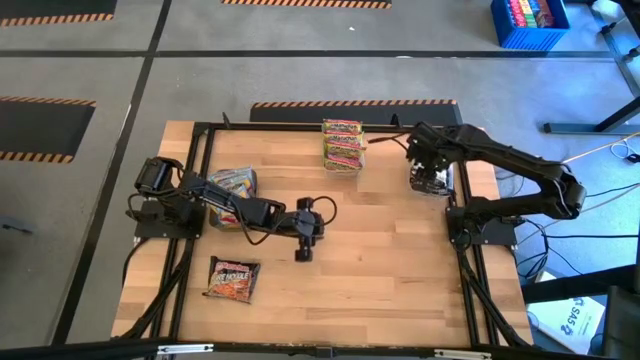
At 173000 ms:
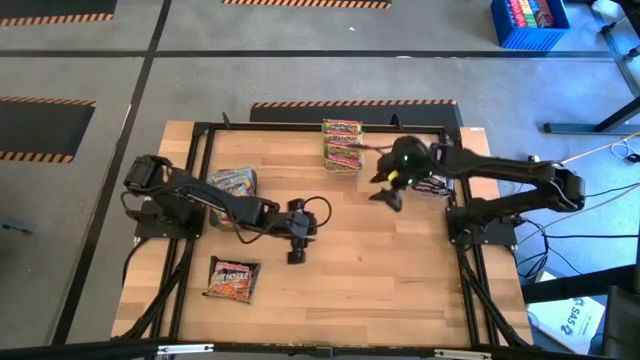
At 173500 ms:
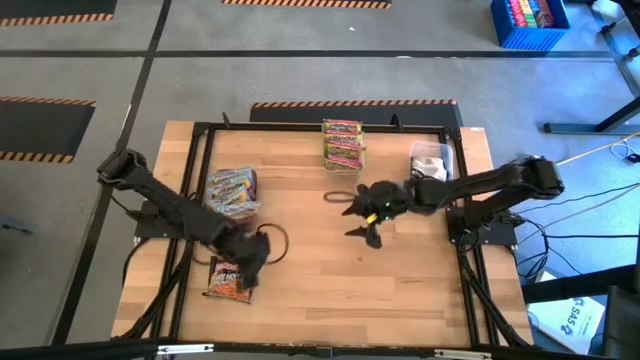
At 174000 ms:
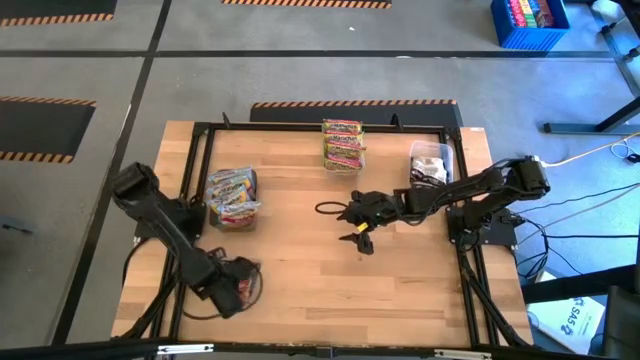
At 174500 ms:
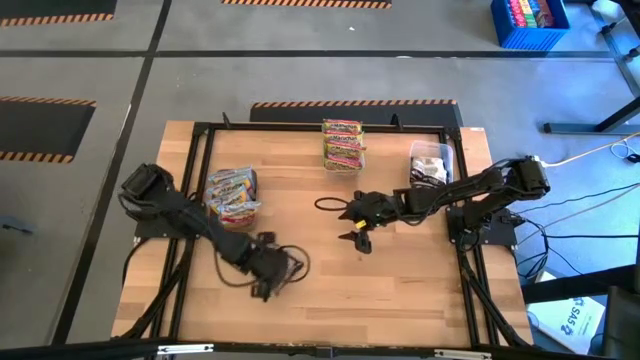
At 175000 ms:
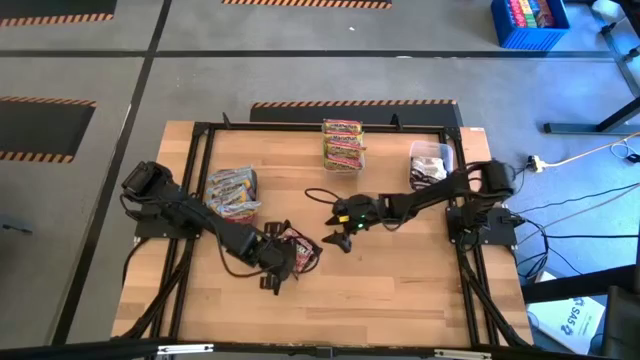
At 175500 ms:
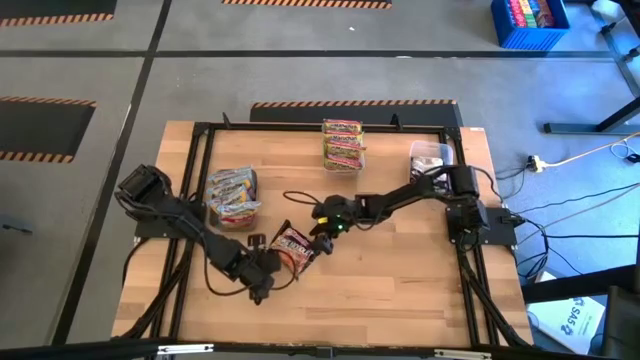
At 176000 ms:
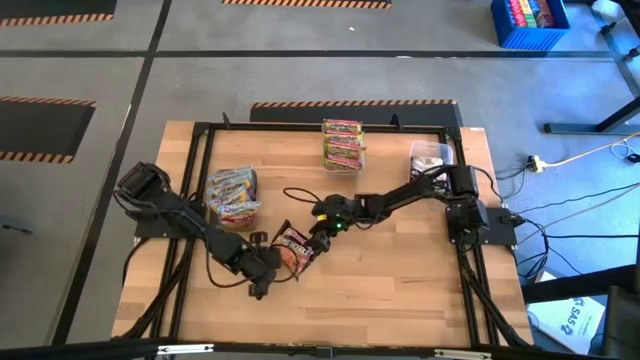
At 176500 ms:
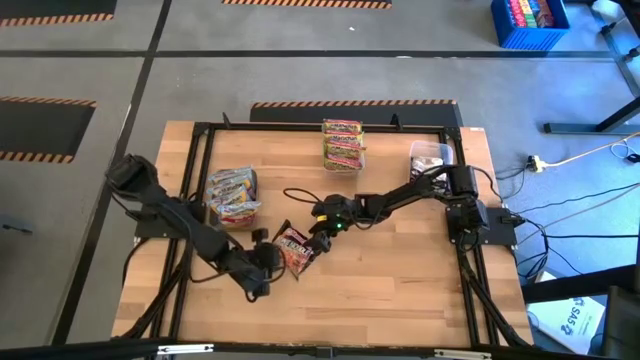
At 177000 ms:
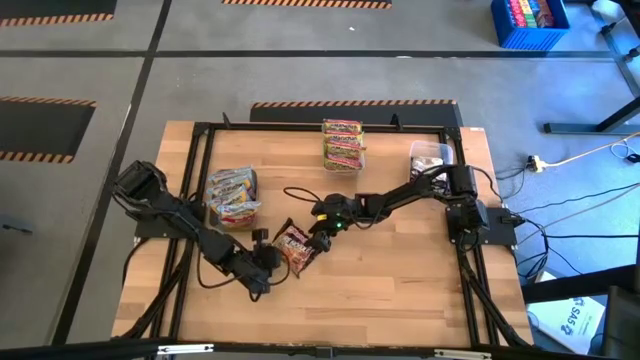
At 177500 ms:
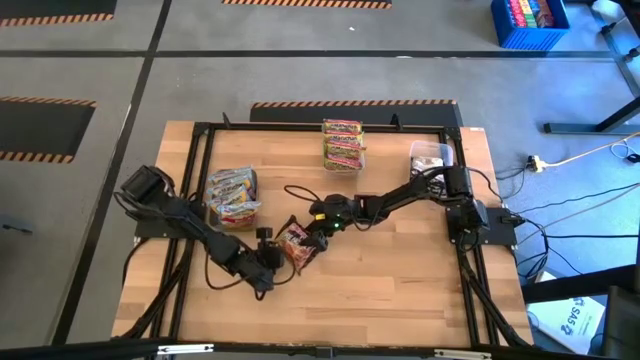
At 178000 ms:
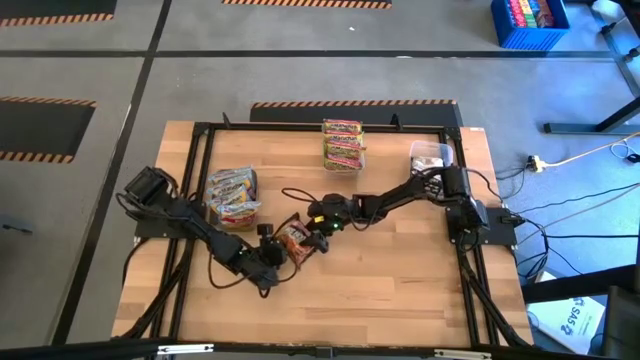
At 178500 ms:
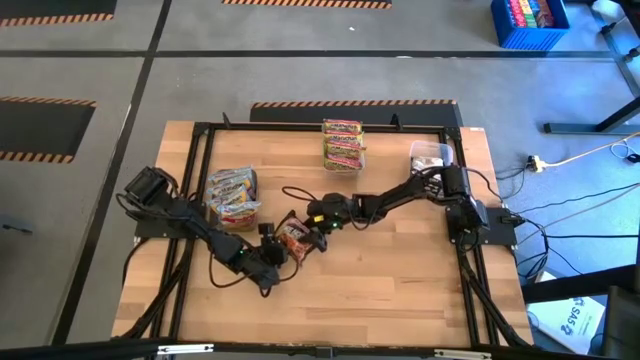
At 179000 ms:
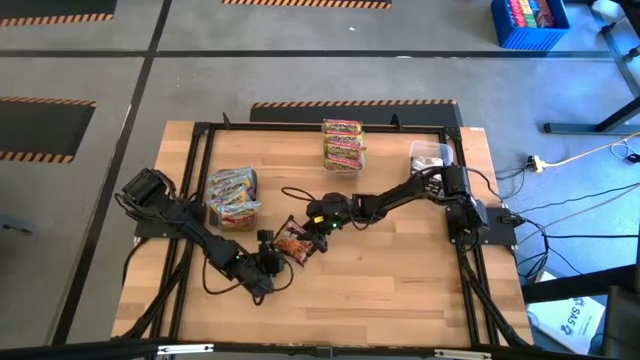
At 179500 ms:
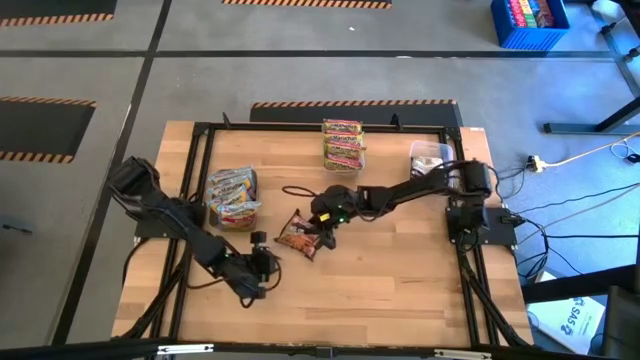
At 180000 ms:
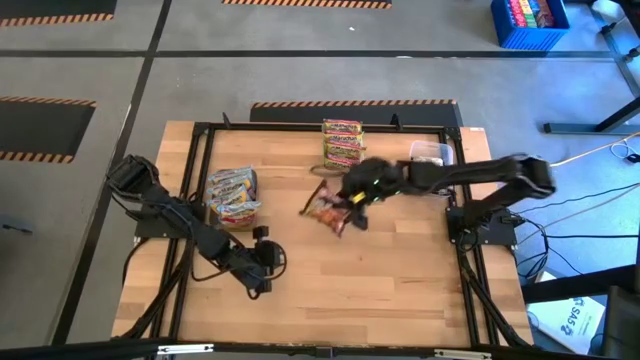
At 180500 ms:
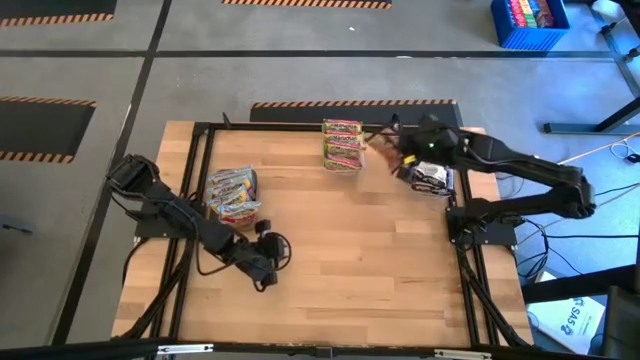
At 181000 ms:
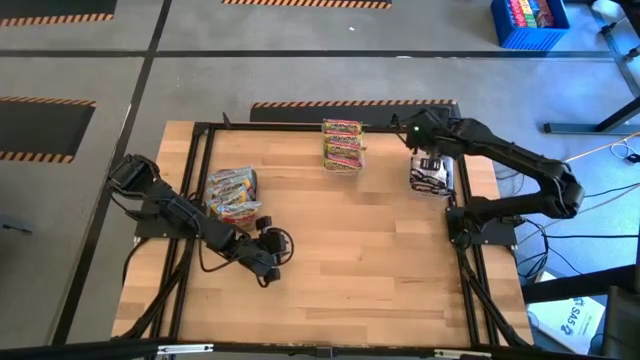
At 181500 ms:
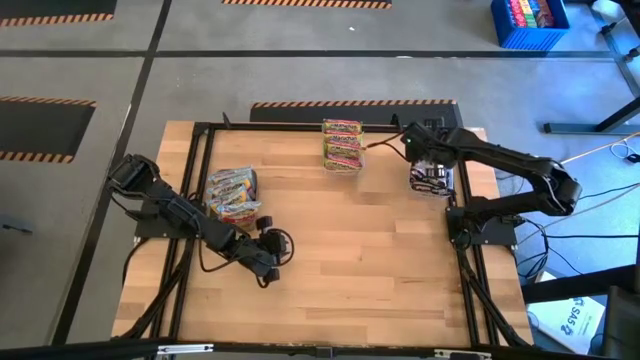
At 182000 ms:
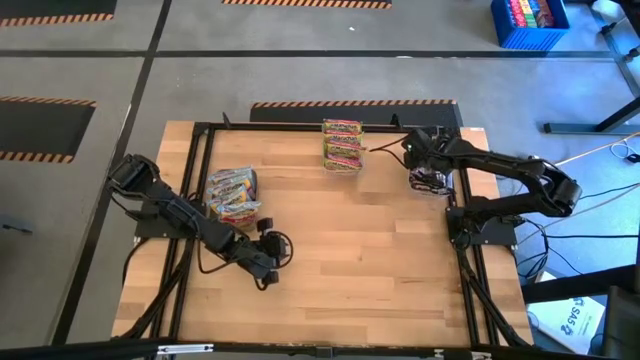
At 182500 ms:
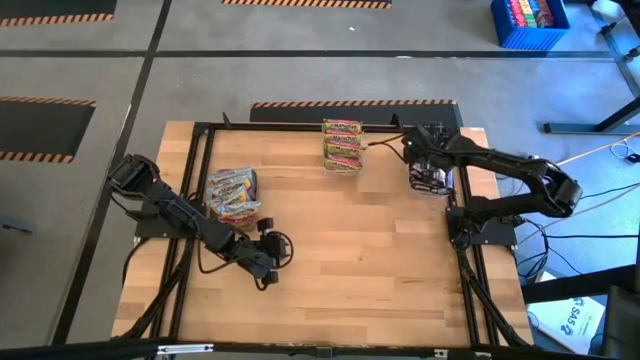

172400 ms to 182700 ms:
Task: Sort Maruchan noodles
Put the black noodle pack into the bottom transparent bin

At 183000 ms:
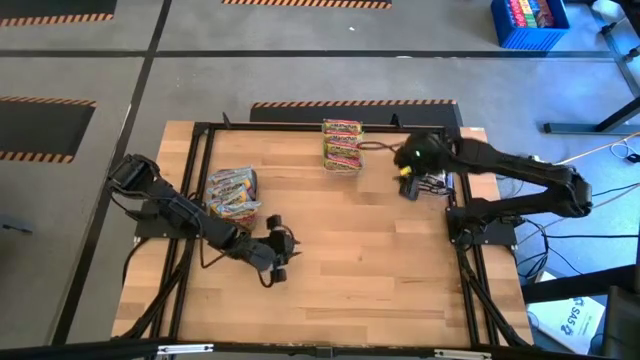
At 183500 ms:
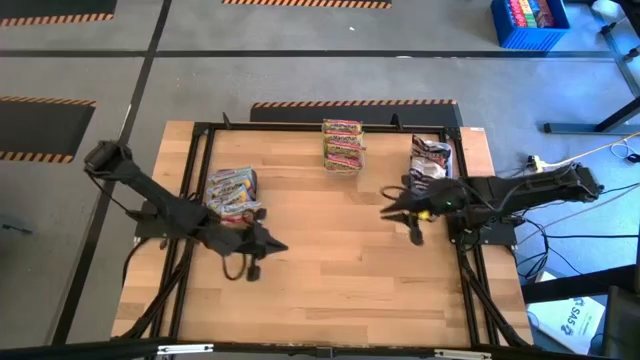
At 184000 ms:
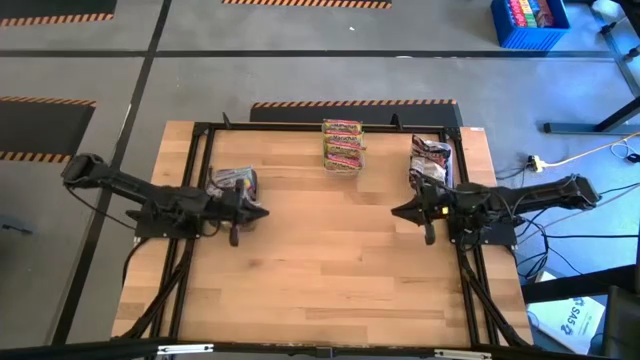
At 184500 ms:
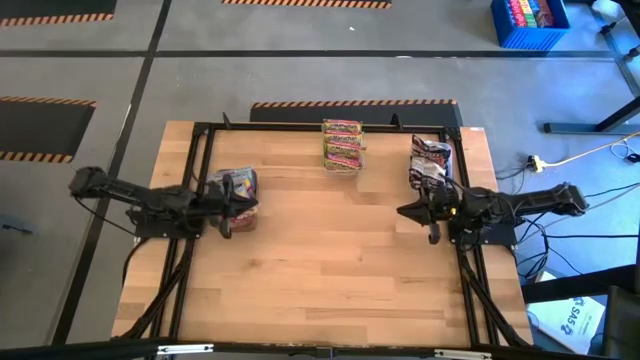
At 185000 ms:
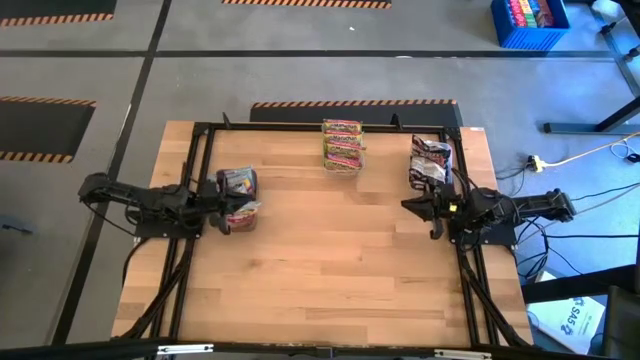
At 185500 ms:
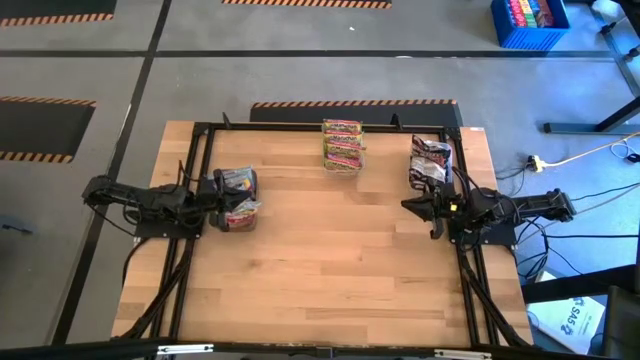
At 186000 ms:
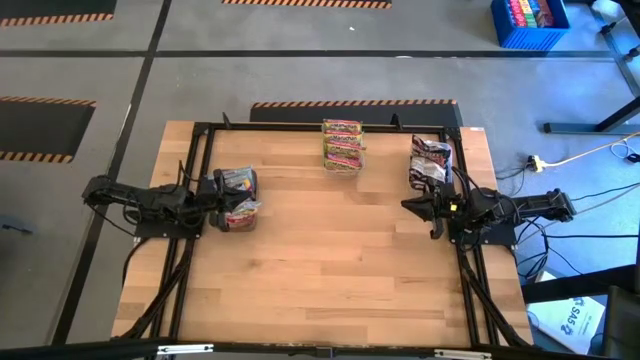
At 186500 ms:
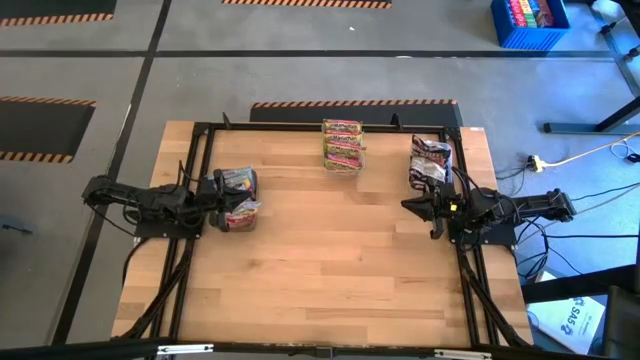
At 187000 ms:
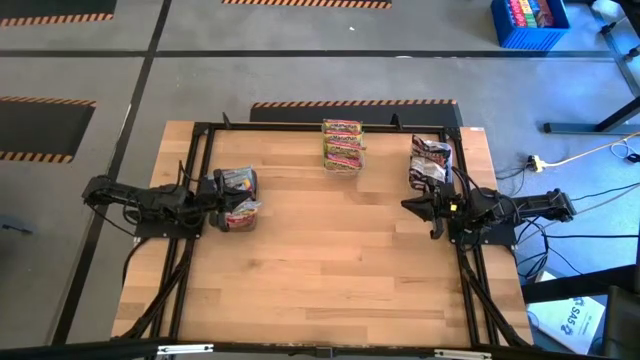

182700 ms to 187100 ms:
Return to Home Position

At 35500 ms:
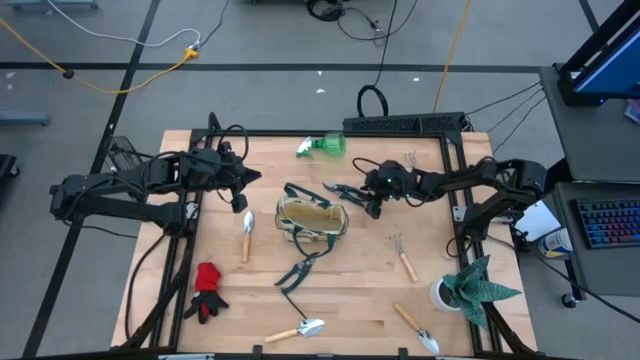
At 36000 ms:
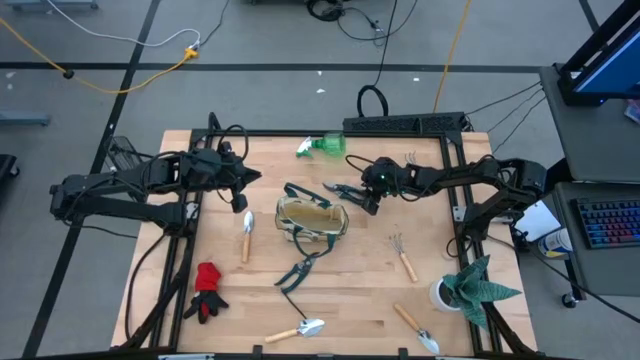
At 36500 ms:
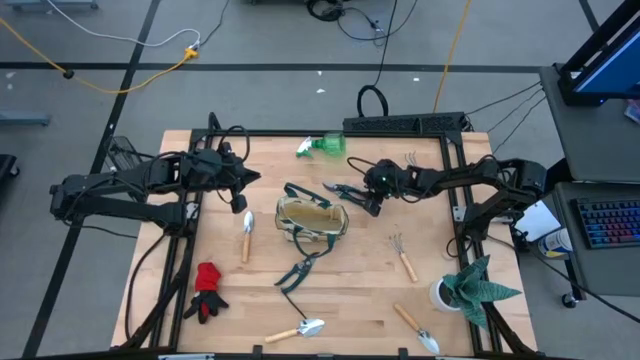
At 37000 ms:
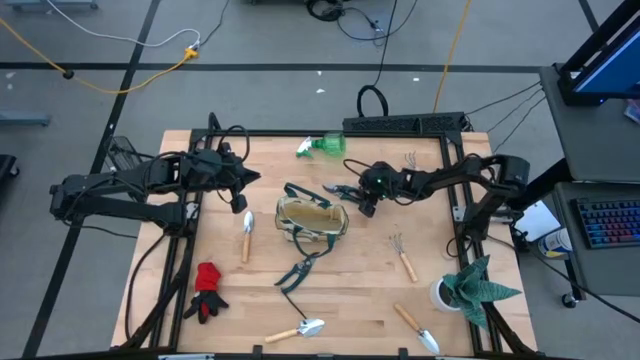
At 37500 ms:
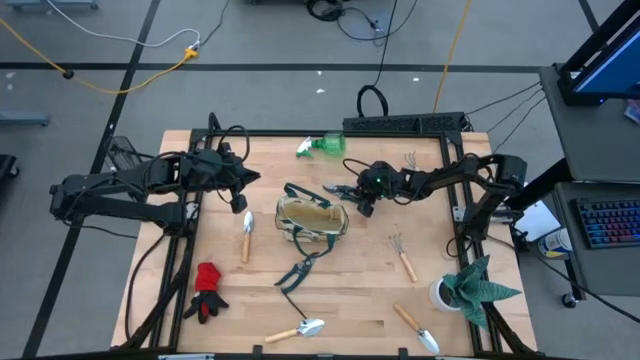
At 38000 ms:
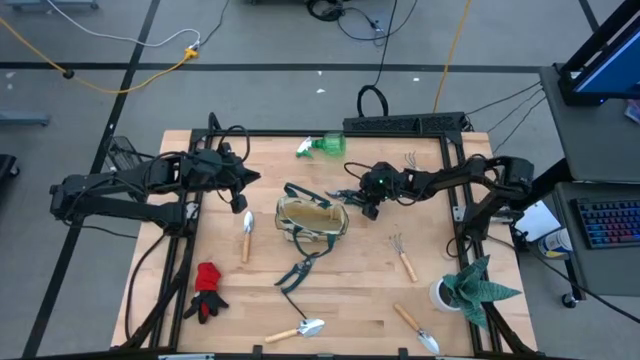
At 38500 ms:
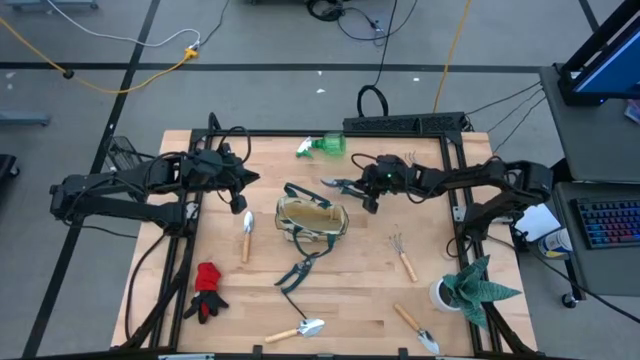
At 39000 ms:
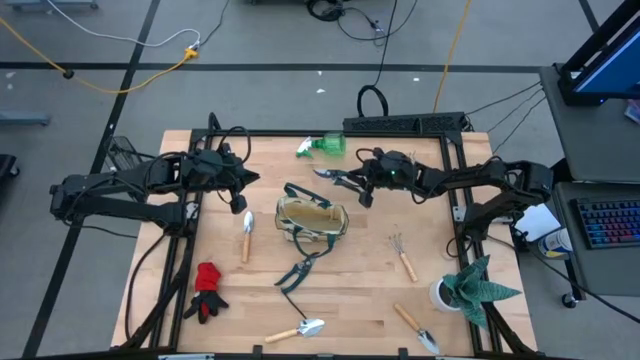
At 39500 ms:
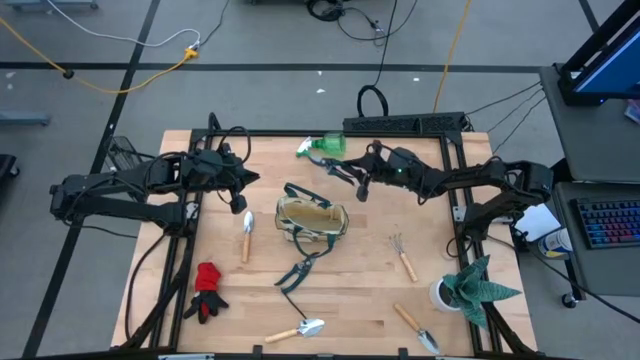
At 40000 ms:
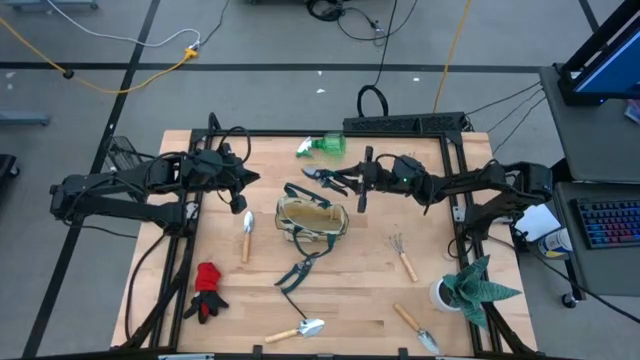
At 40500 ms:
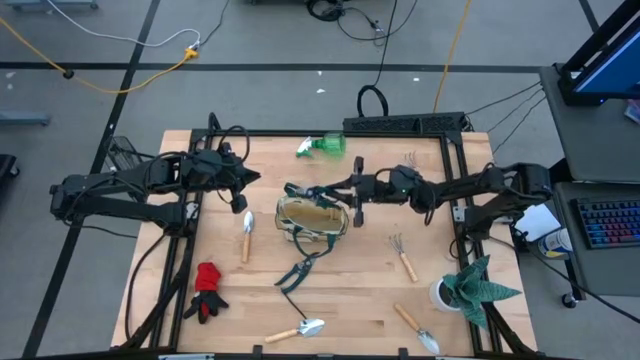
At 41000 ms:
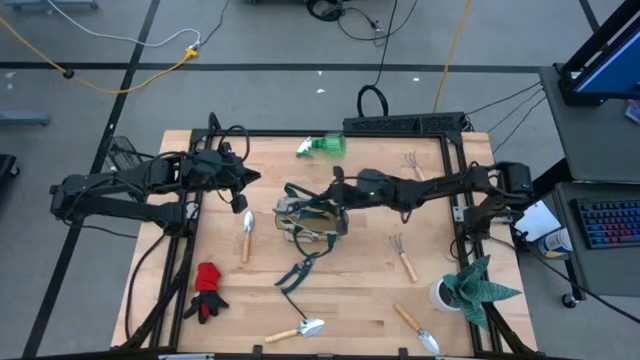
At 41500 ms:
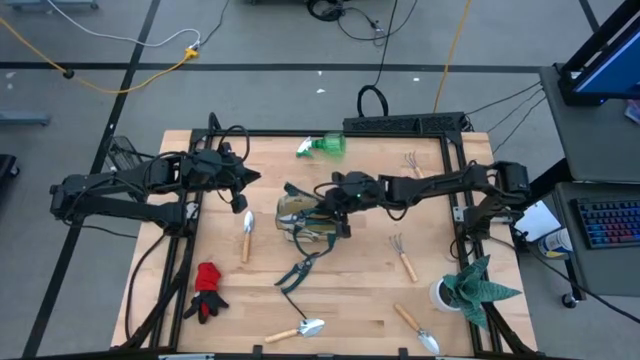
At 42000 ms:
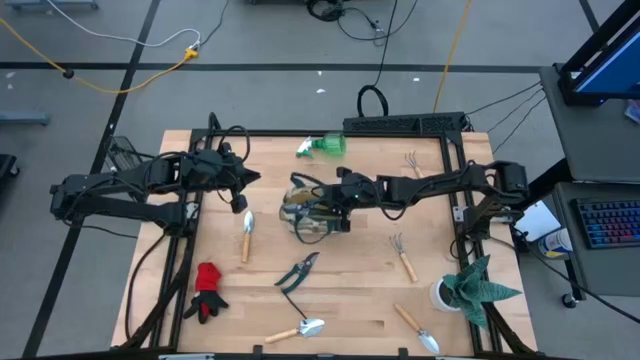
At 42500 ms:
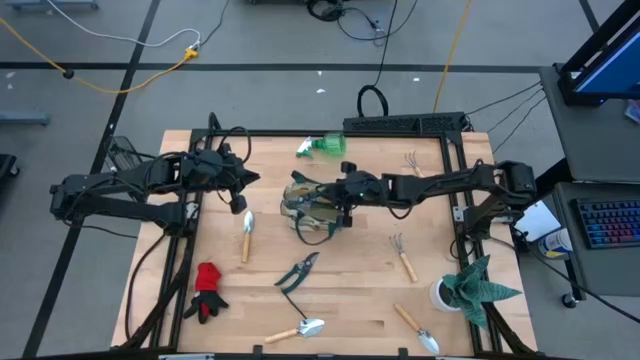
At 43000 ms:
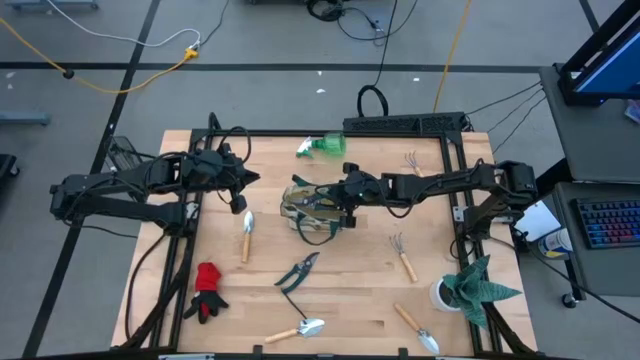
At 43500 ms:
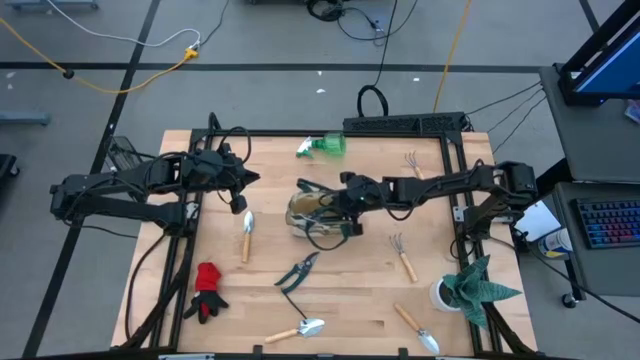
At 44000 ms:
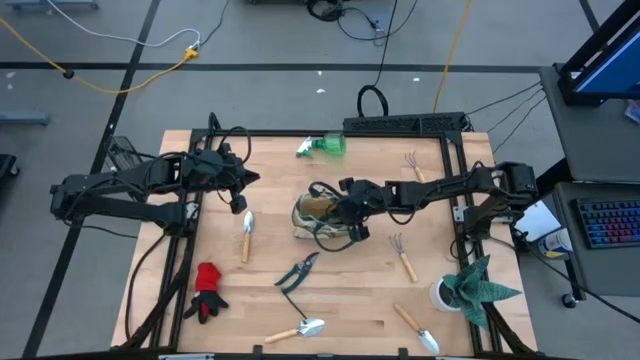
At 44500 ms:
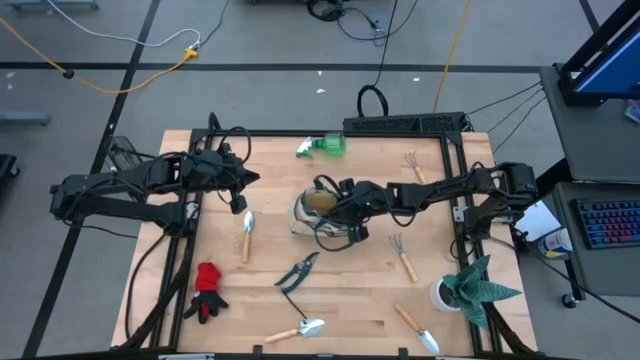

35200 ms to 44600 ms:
Task: Pick & Place Garden tools in Gardening bag
Put the top green shears into the brown gardening bag
